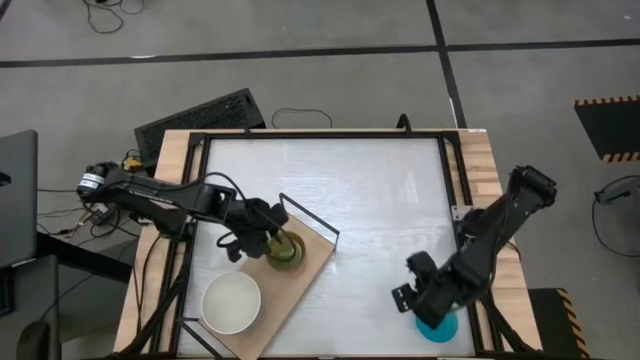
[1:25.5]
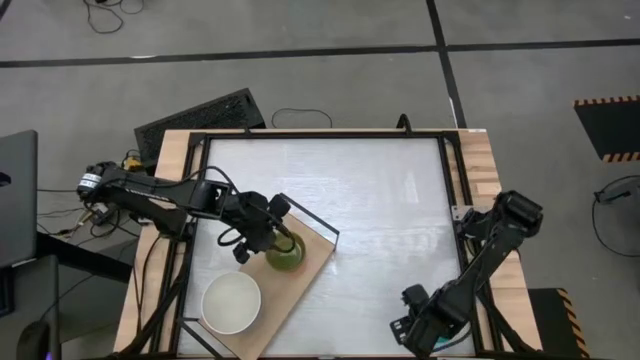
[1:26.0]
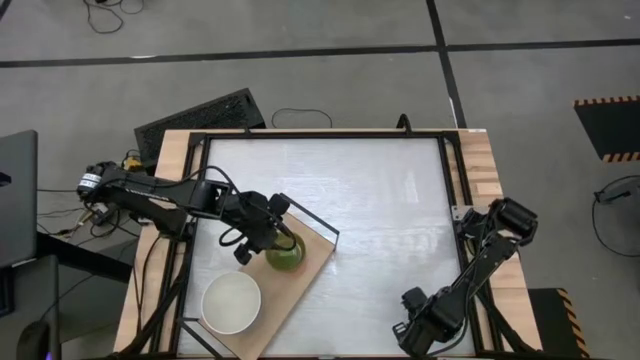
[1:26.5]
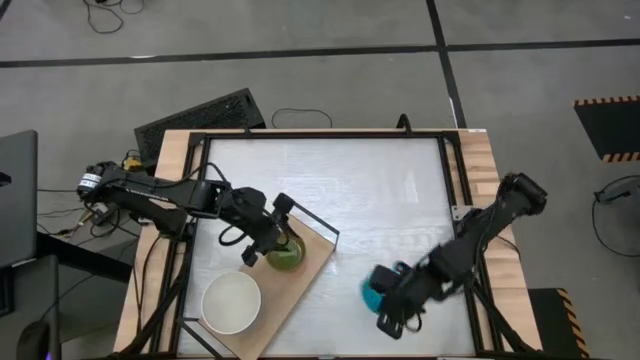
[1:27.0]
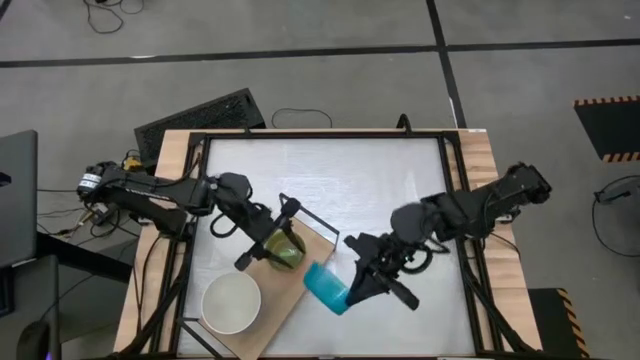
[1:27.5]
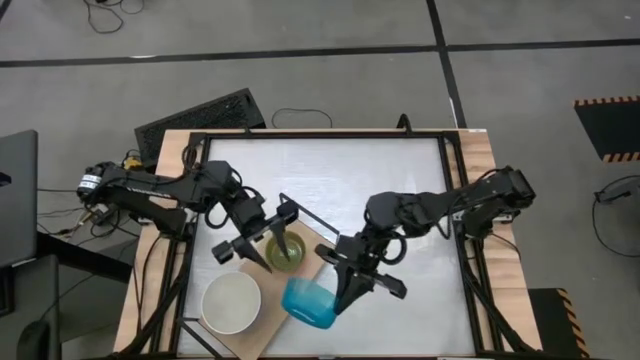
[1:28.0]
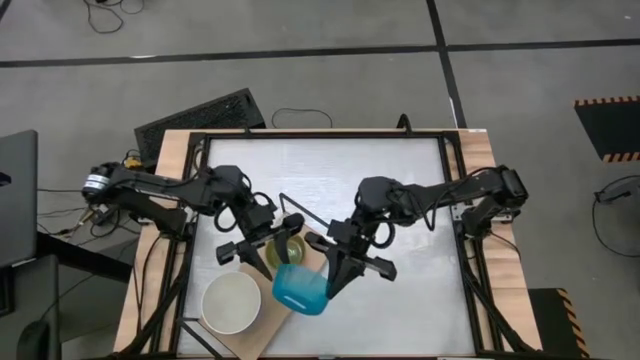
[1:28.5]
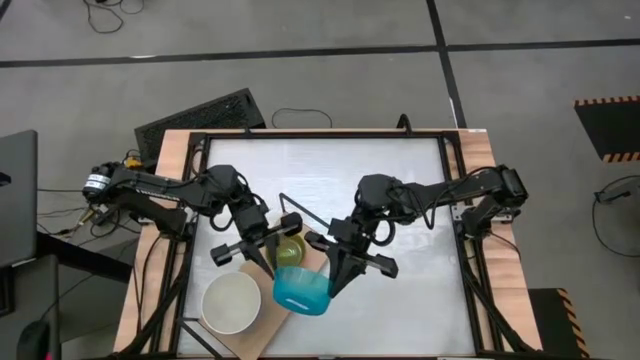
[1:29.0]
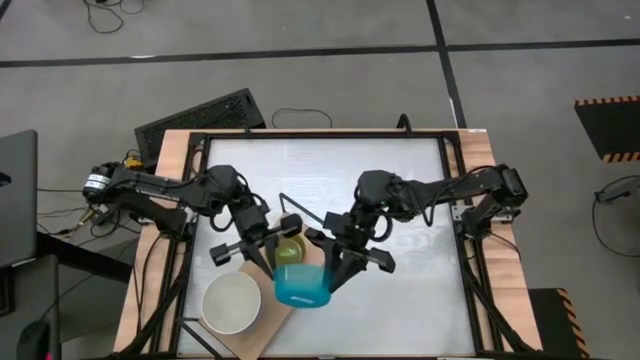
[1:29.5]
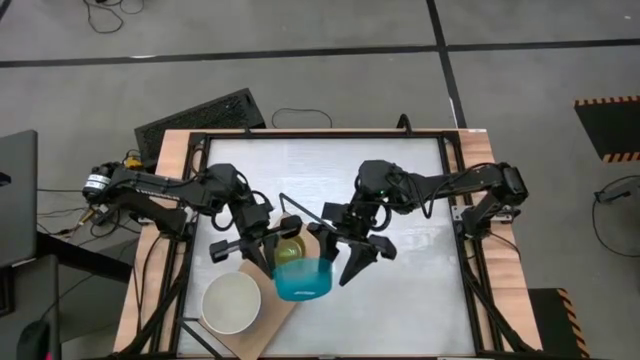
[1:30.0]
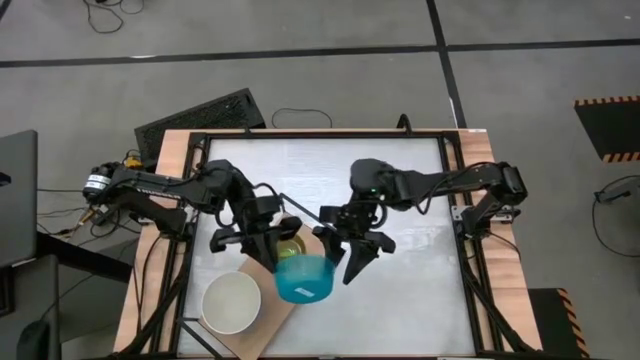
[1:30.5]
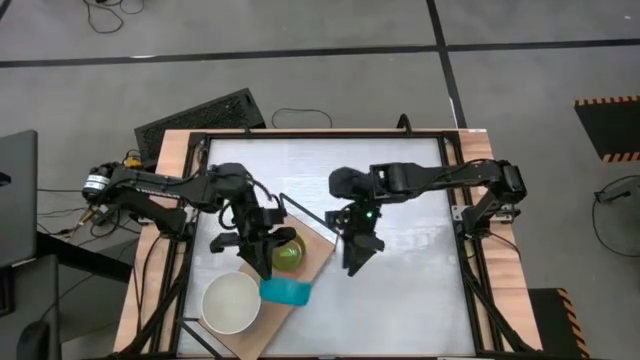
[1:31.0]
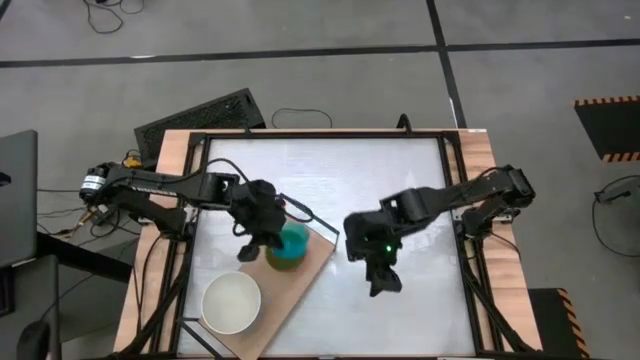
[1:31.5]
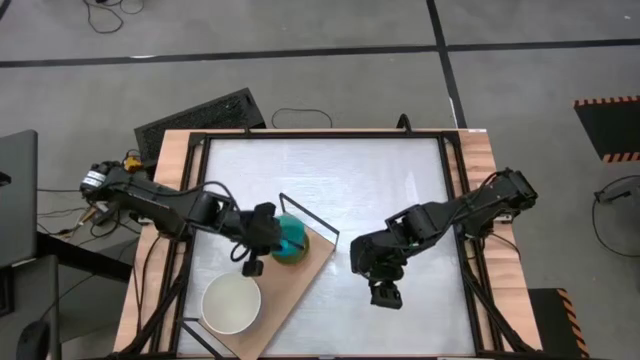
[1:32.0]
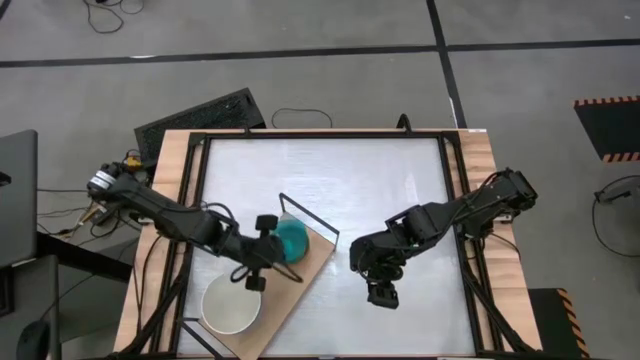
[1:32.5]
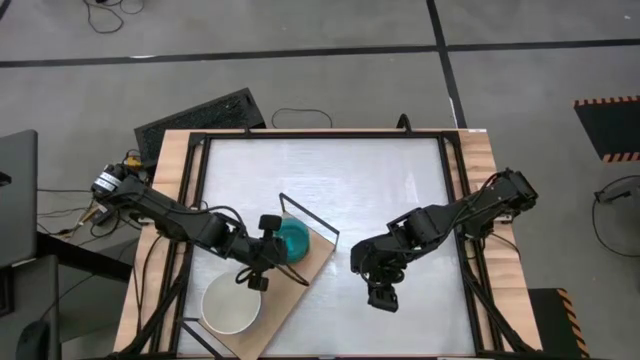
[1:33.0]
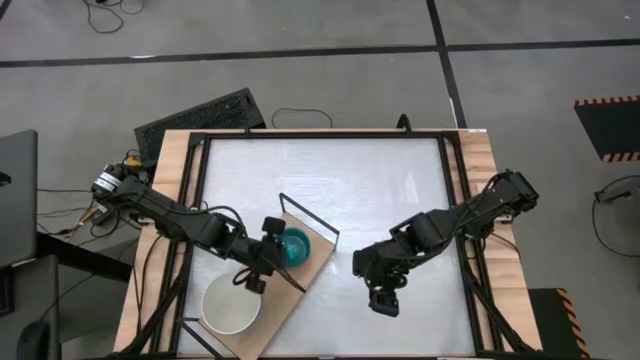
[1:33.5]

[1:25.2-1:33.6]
Task: Place and stack bowls onto a shelf
Stack the small blue bowl on the small green bowl on the shelf

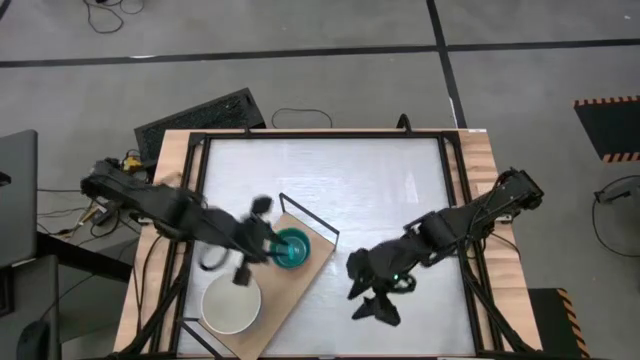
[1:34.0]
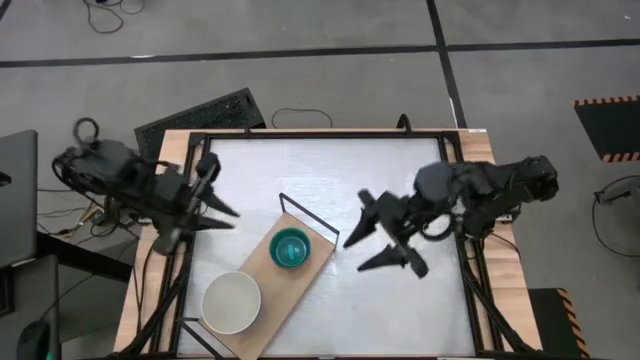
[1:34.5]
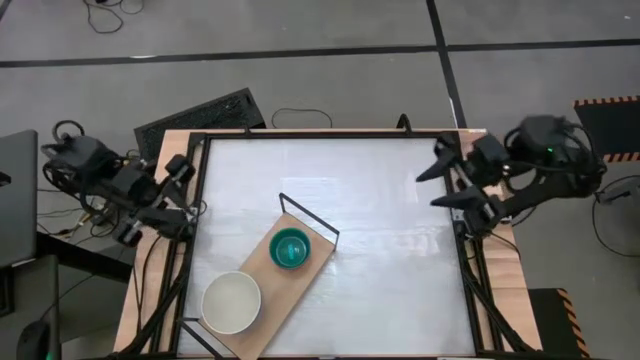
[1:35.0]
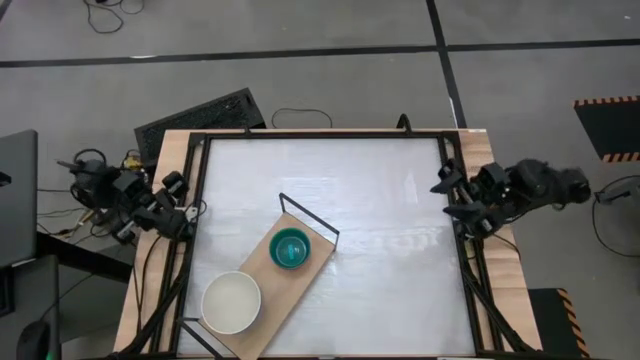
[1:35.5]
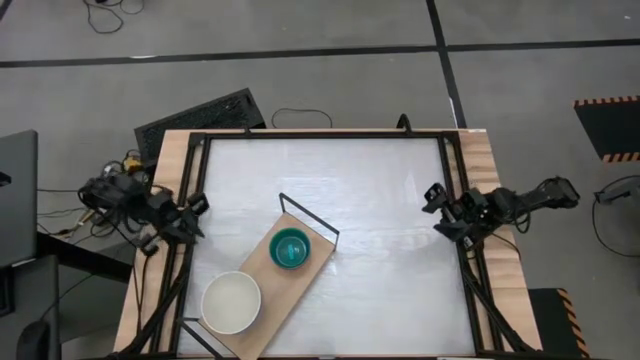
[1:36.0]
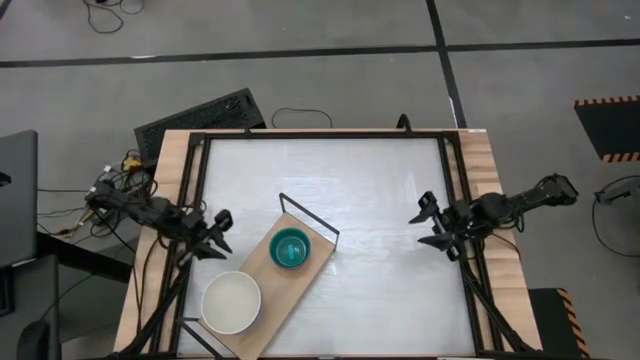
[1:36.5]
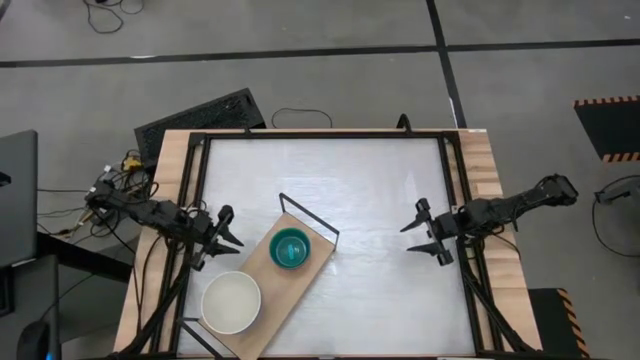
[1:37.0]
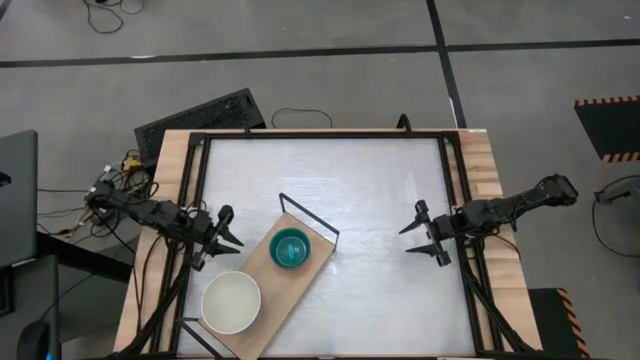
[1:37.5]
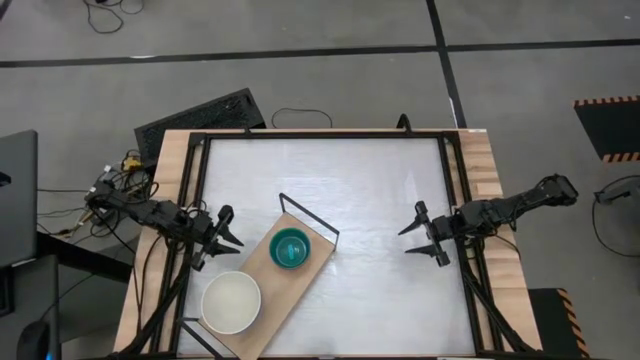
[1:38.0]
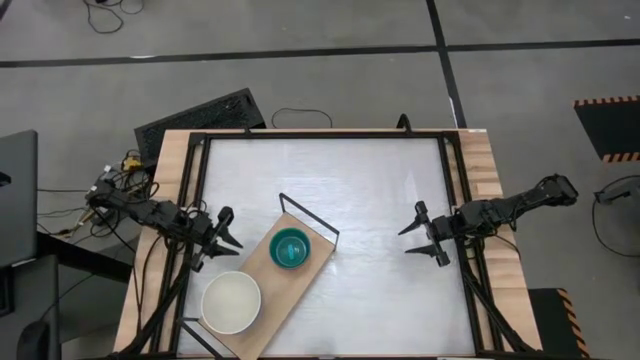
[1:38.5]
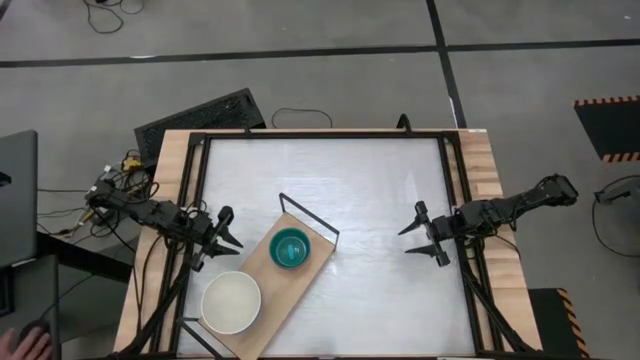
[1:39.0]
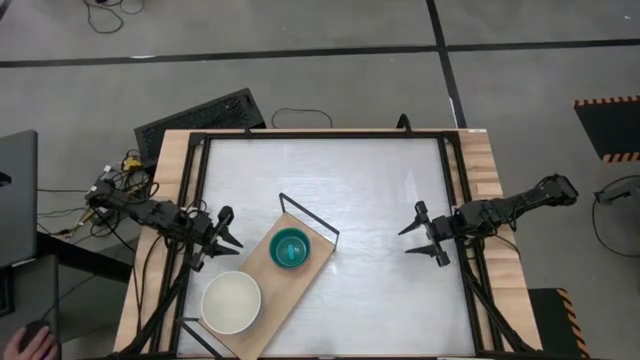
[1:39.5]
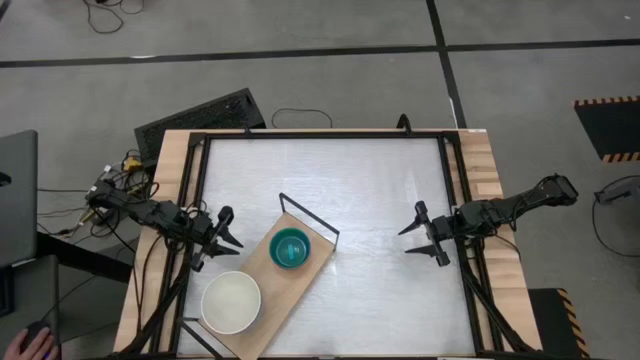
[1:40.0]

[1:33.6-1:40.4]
Return to Home Position

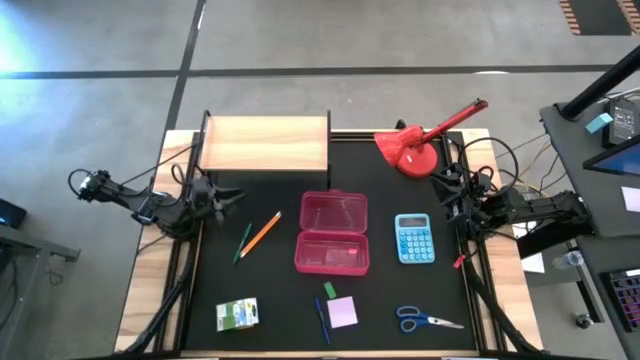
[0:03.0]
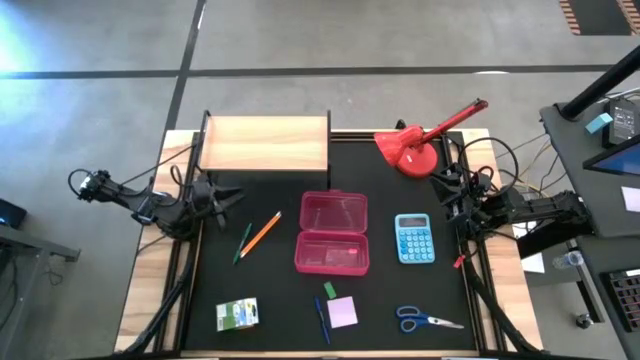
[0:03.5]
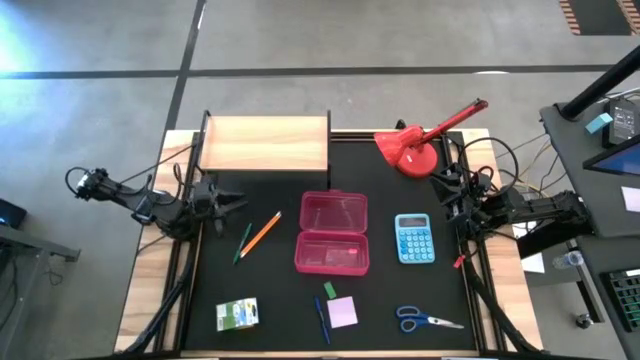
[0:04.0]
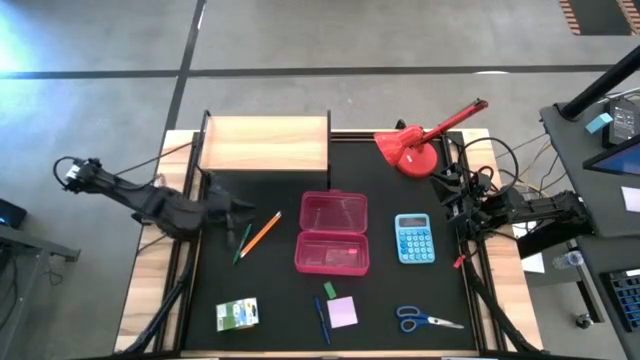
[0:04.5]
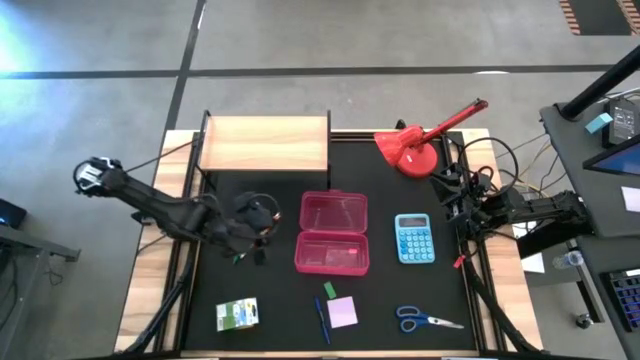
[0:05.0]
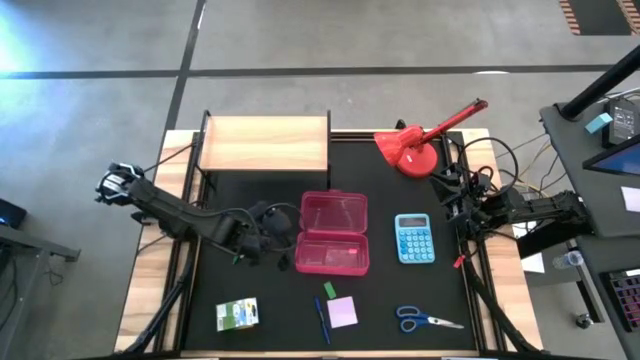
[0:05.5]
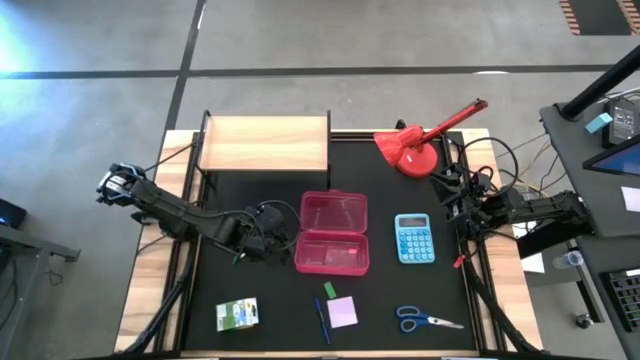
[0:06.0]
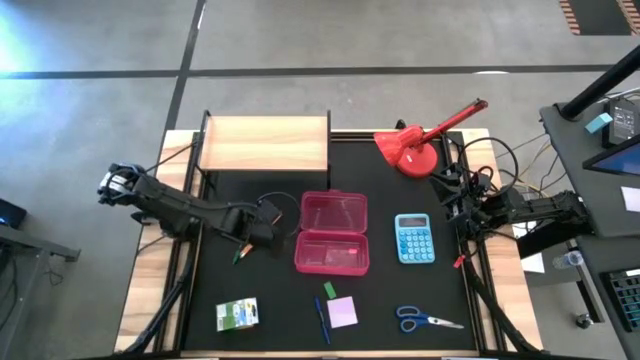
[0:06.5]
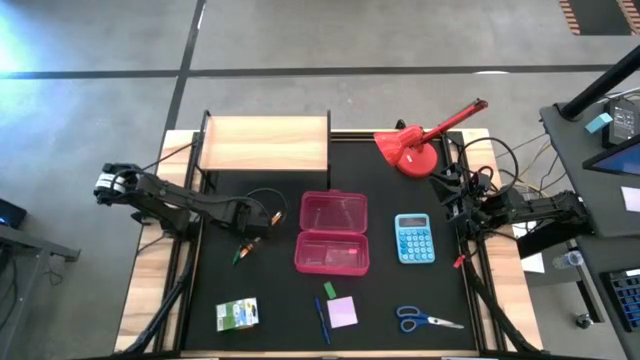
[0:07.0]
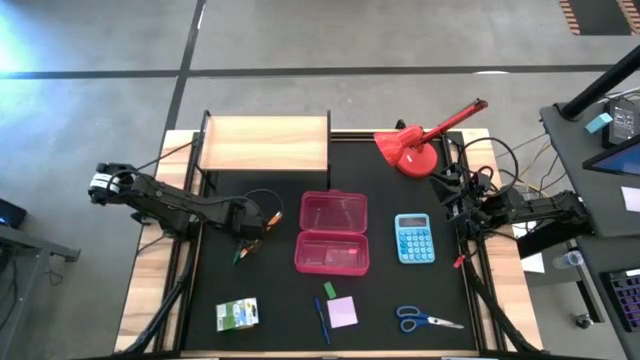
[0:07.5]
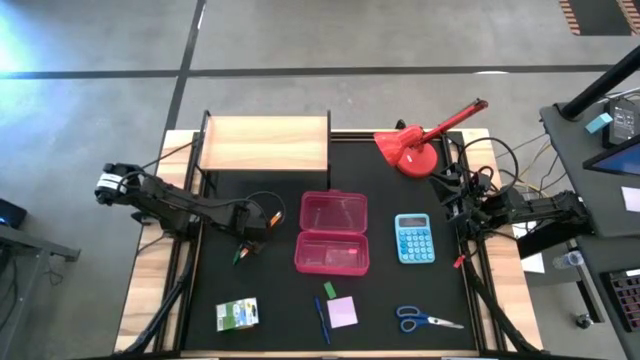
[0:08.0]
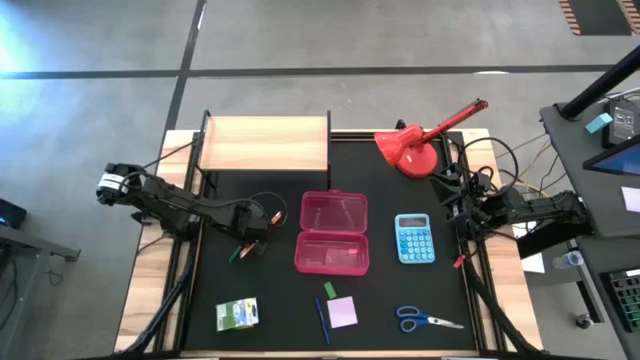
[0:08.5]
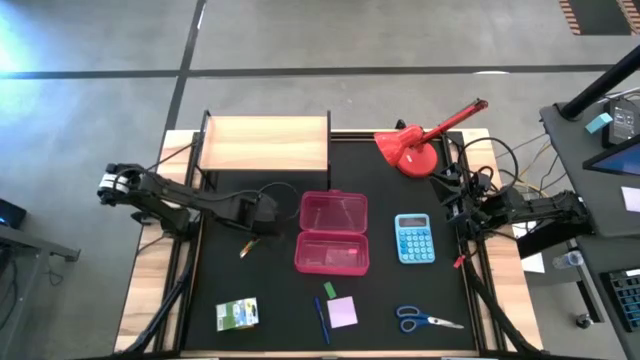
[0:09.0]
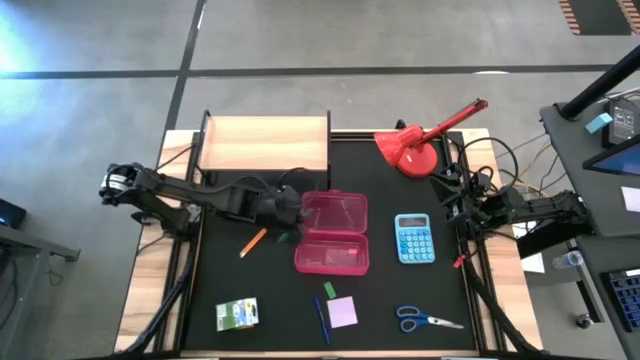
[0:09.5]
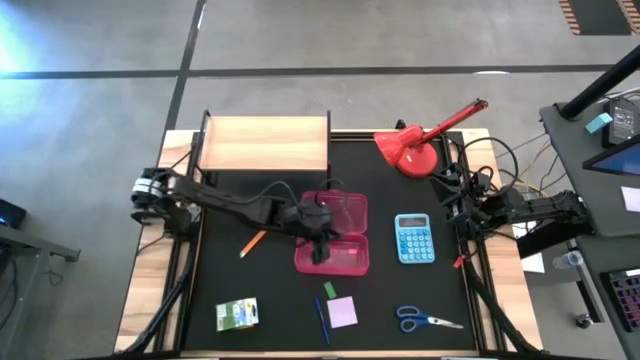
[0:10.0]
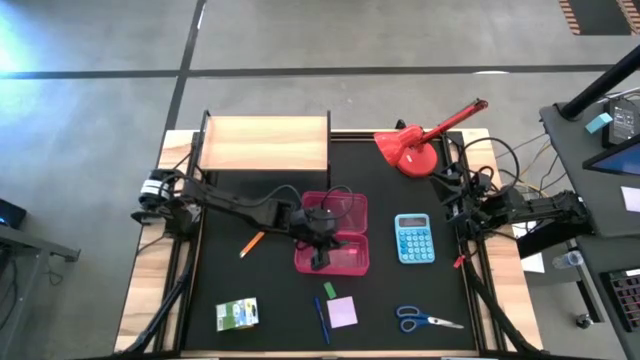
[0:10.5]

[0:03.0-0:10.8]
Task: Pack school essentials
Put the green pen into the pink supply box
